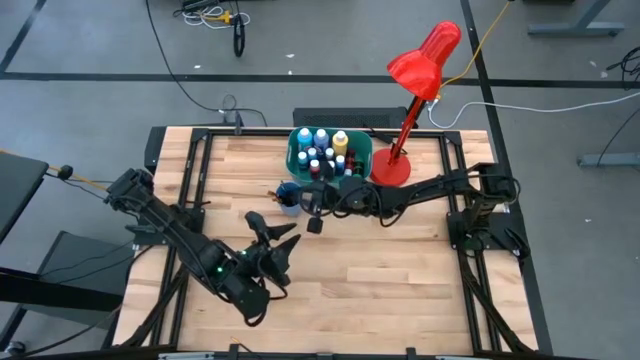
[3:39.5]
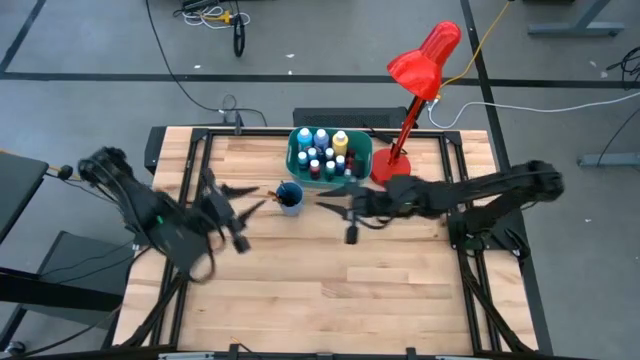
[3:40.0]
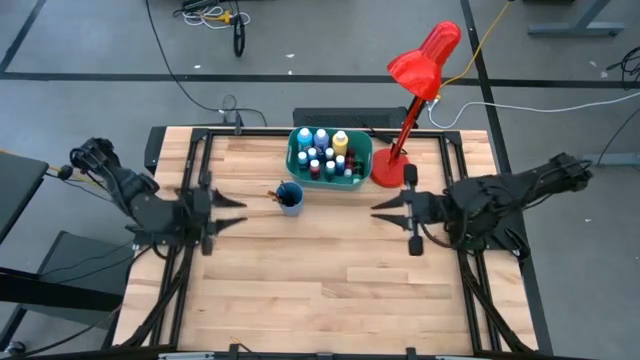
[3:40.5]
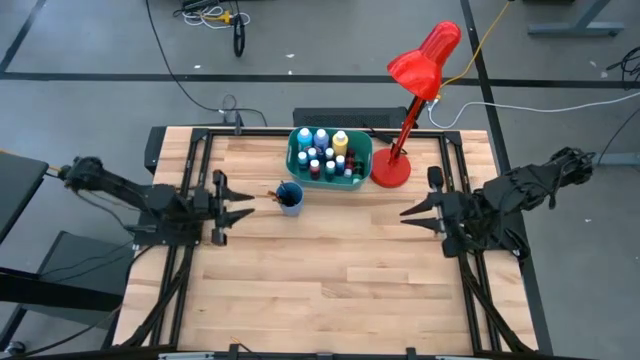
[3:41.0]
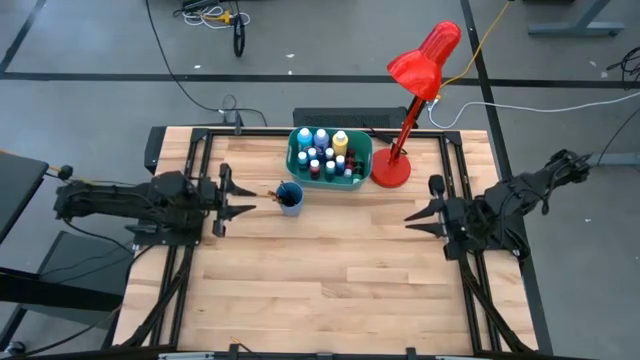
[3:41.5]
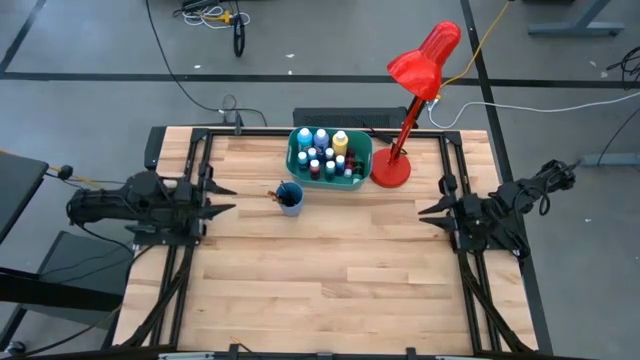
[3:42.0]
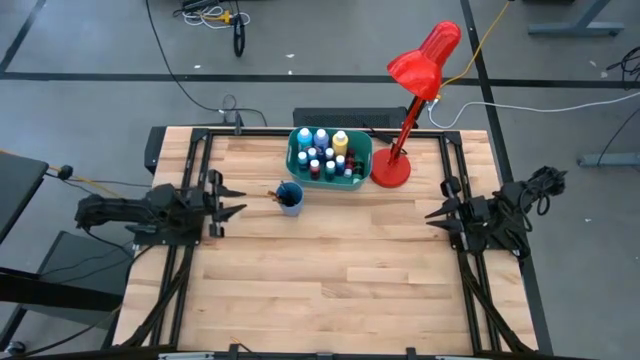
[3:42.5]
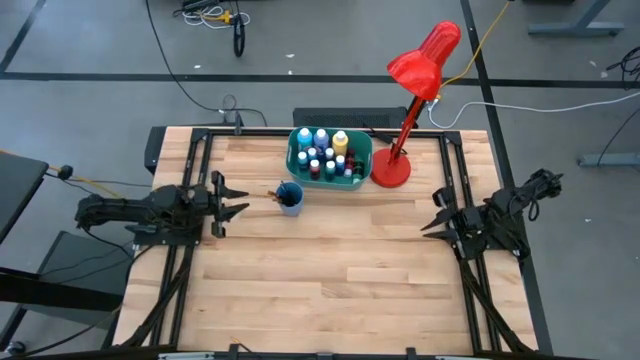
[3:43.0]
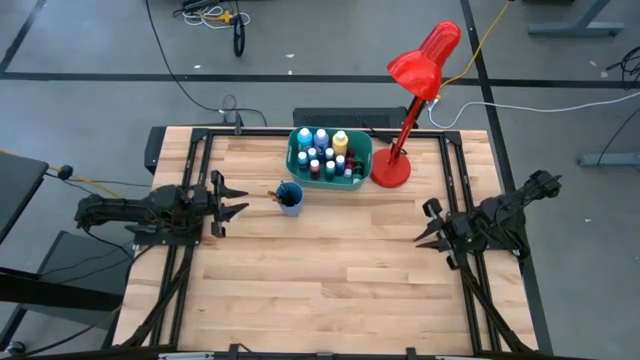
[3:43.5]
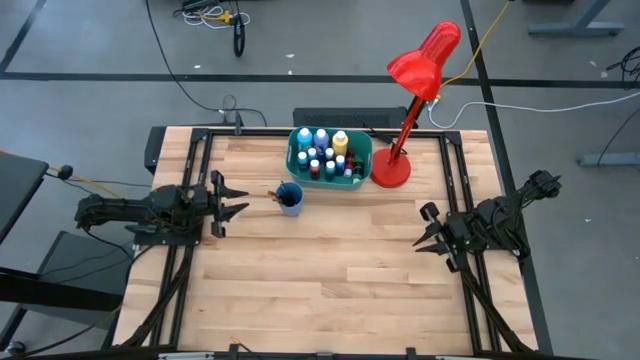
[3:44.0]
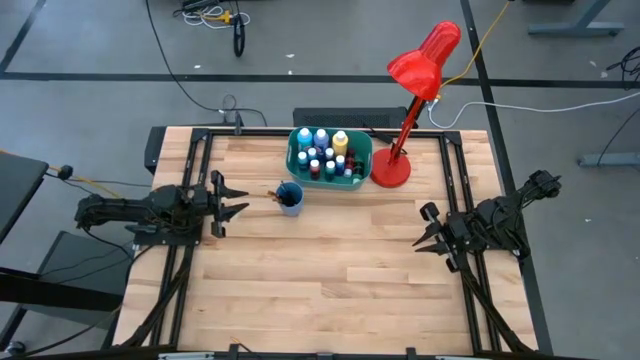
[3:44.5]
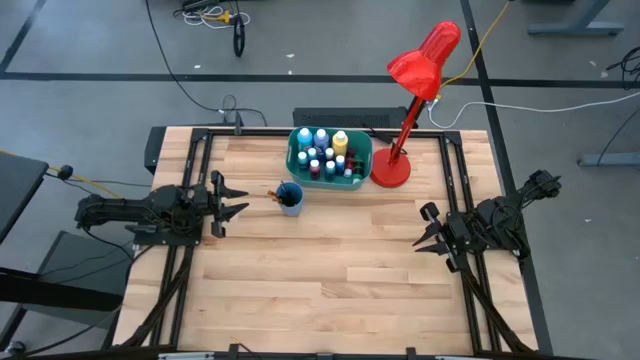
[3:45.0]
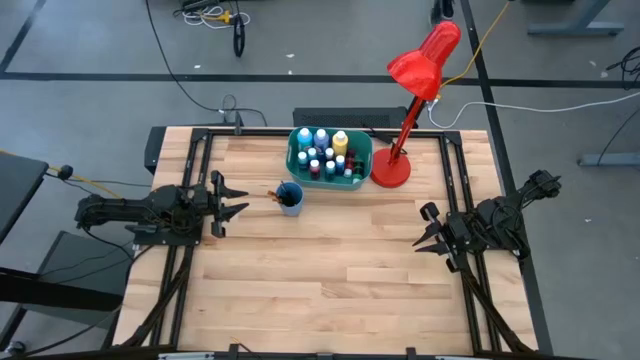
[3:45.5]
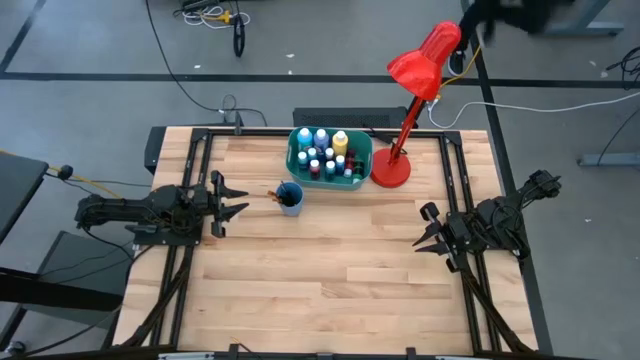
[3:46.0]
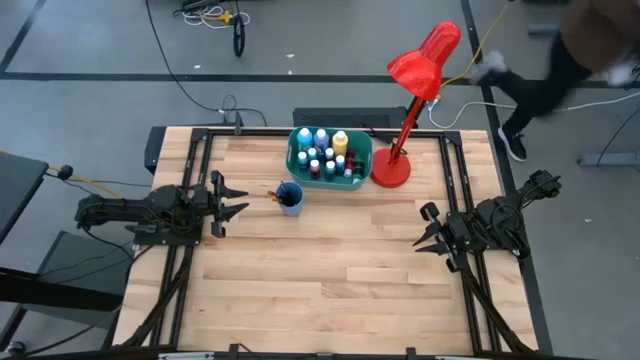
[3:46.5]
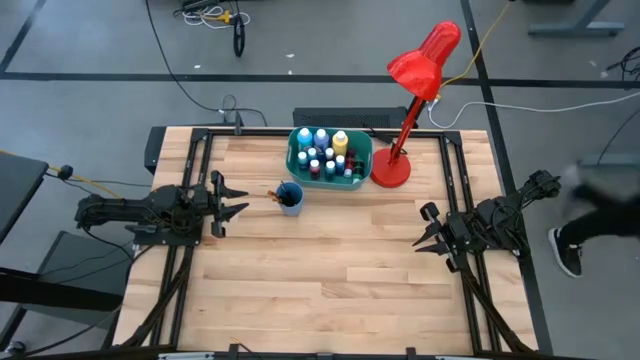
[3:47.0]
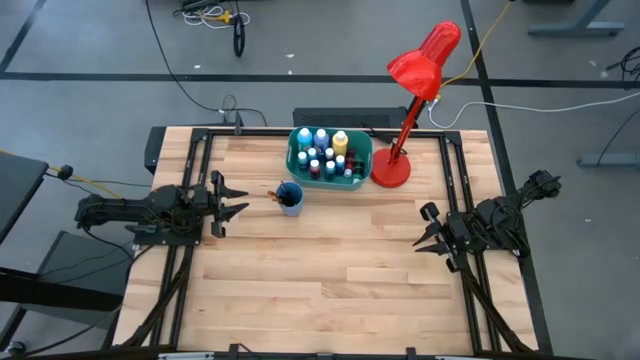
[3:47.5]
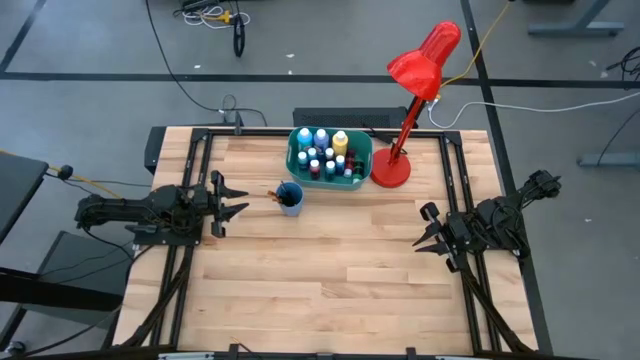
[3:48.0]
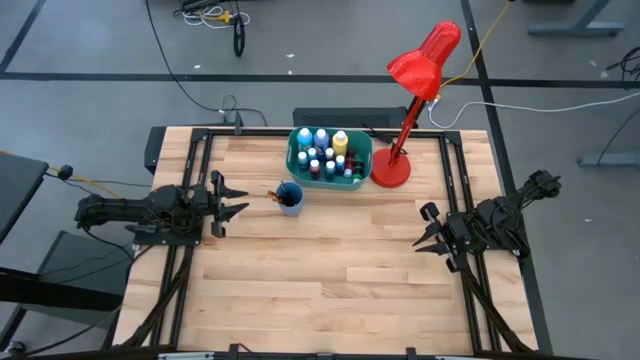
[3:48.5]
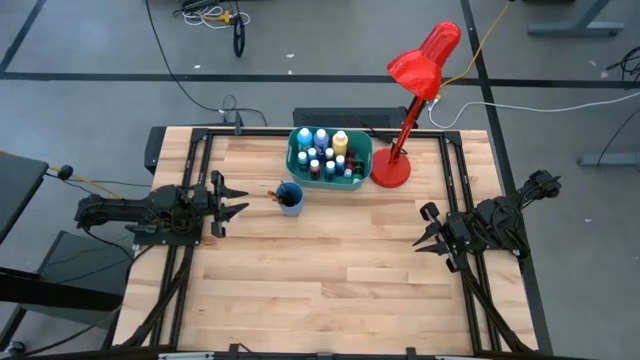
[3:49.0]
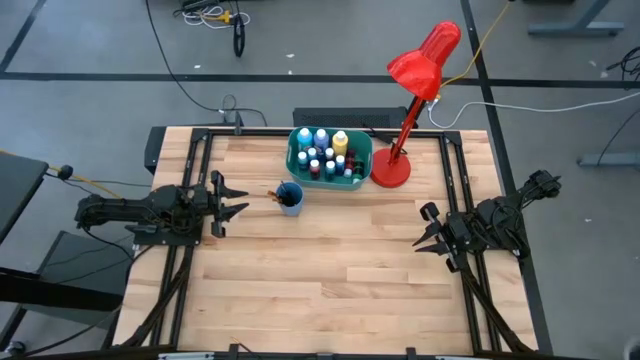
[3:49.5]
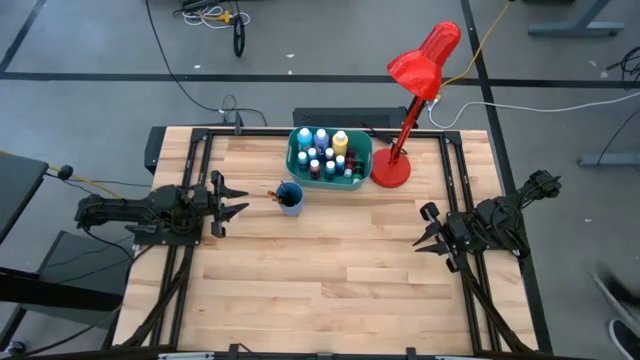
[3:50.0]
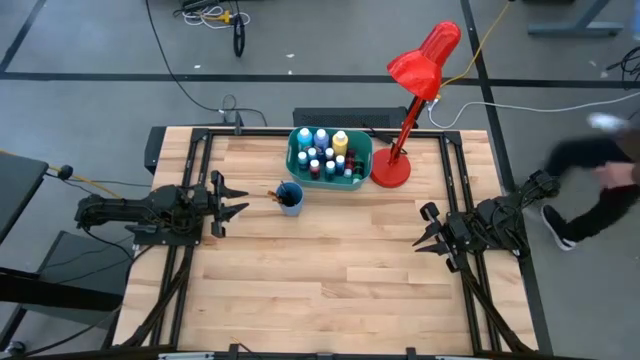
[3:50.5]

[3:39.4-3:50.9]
Task: Pick & Place Paint Supplies
Return to Home Position

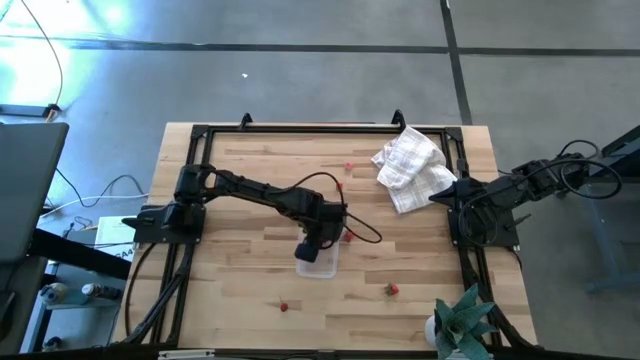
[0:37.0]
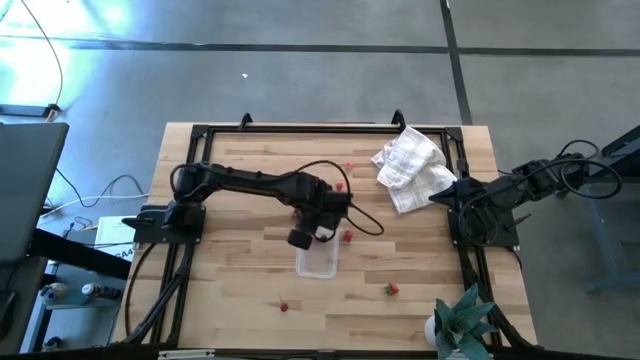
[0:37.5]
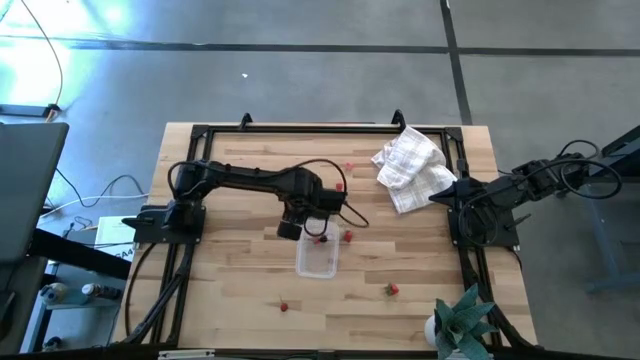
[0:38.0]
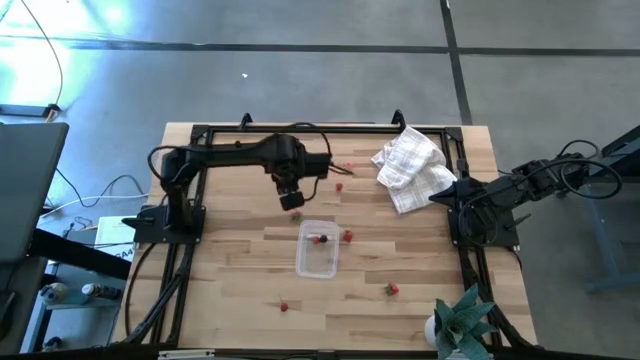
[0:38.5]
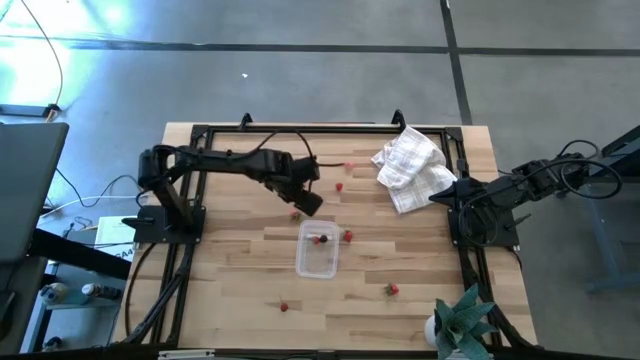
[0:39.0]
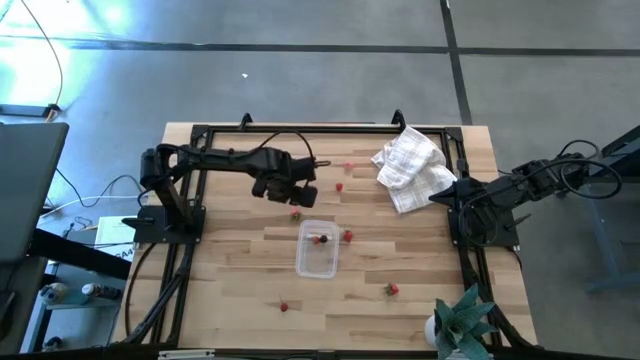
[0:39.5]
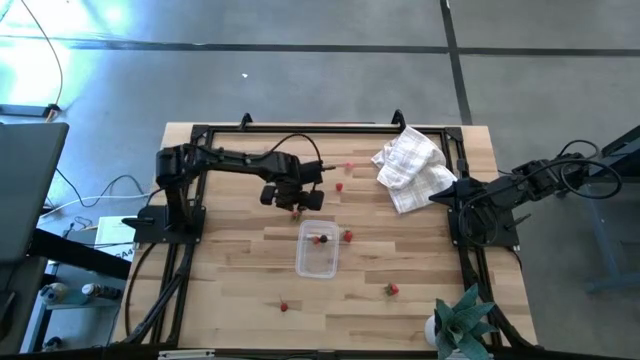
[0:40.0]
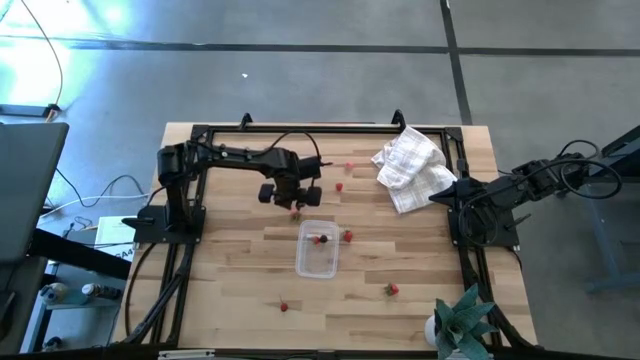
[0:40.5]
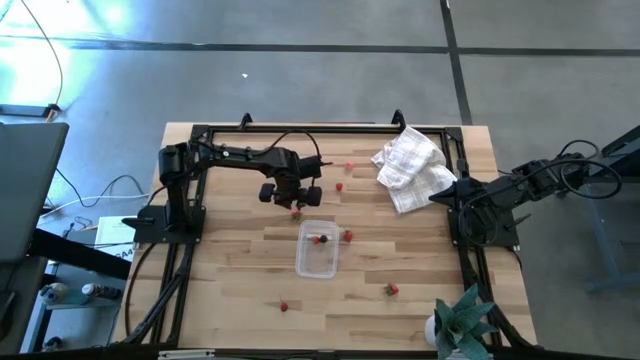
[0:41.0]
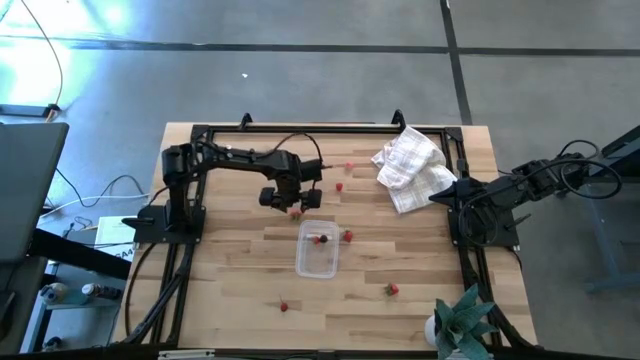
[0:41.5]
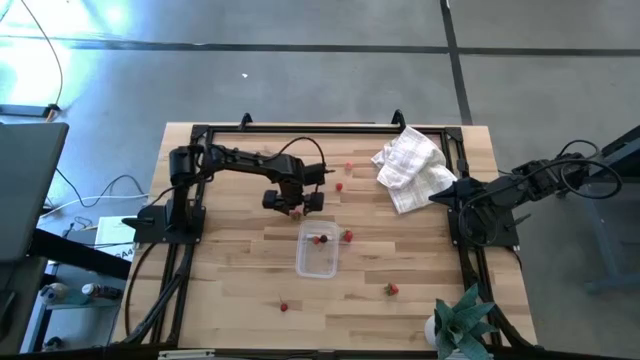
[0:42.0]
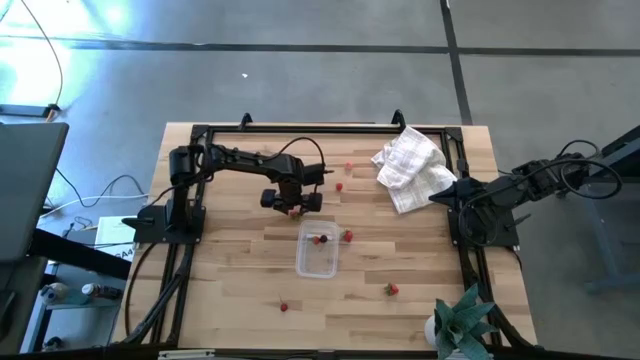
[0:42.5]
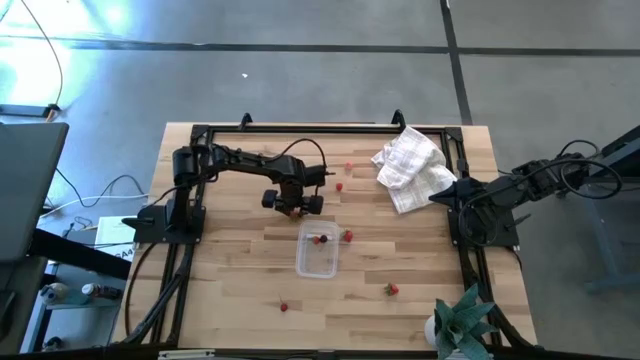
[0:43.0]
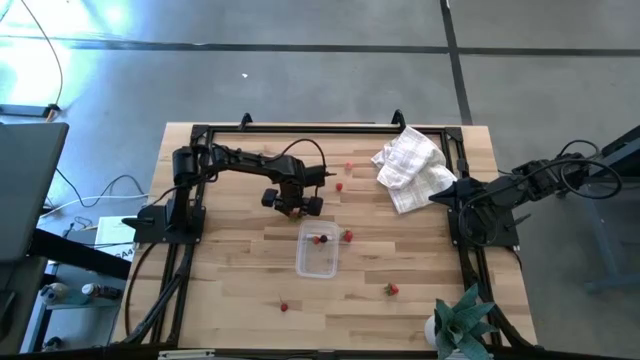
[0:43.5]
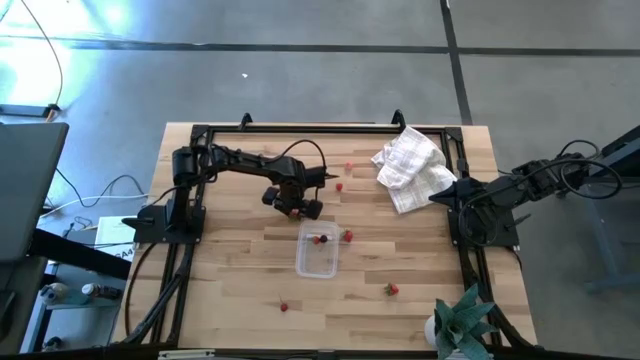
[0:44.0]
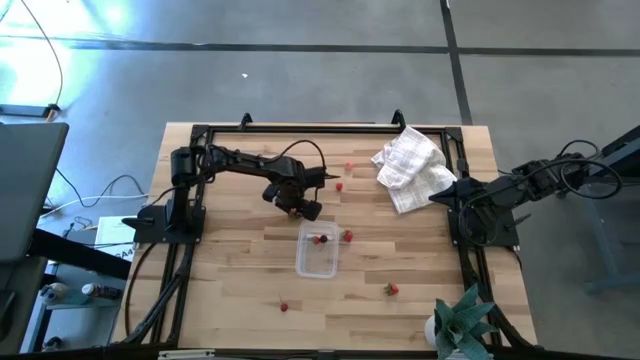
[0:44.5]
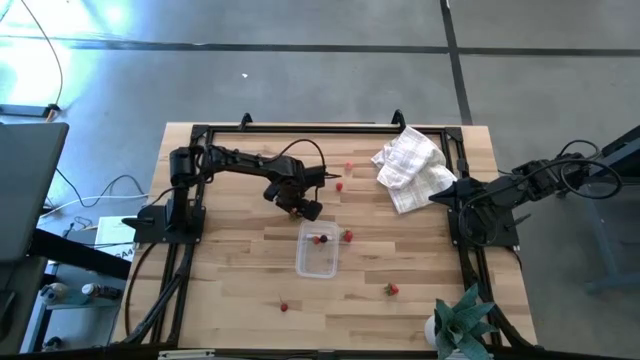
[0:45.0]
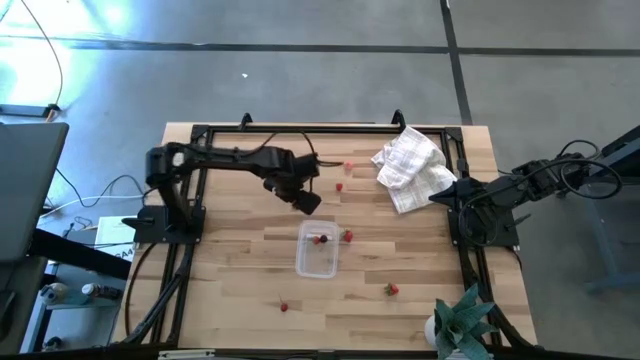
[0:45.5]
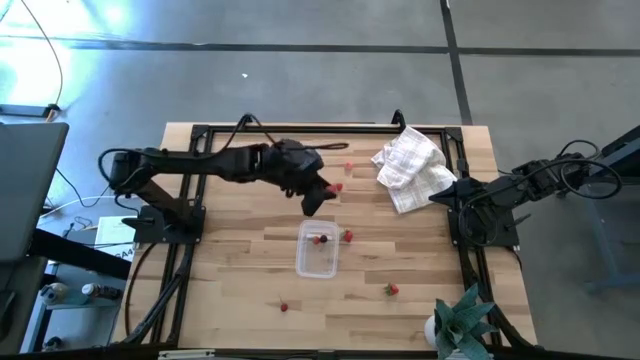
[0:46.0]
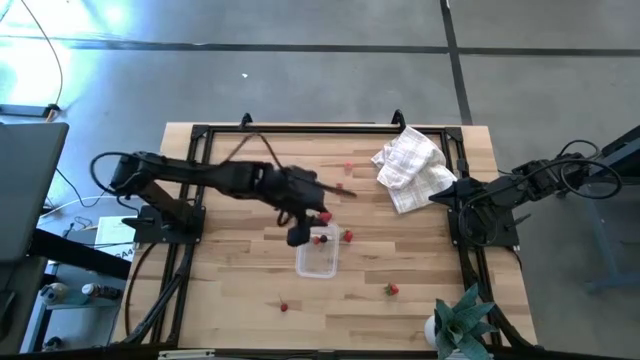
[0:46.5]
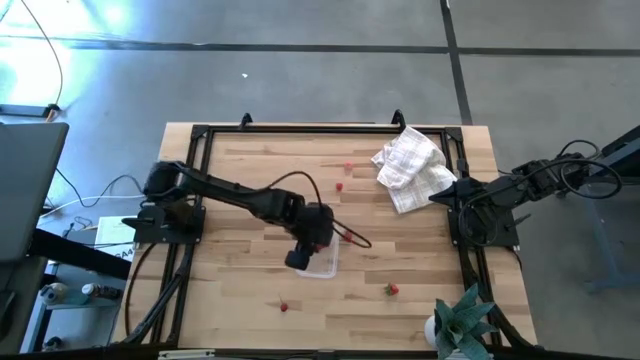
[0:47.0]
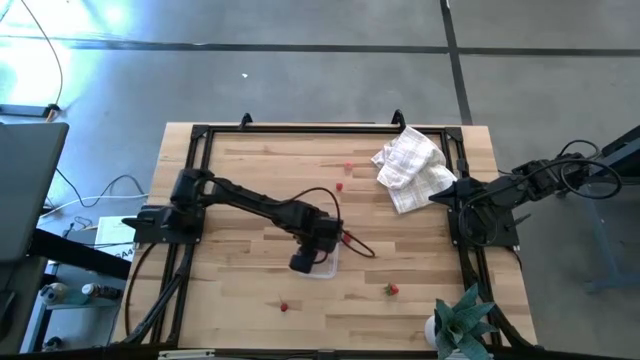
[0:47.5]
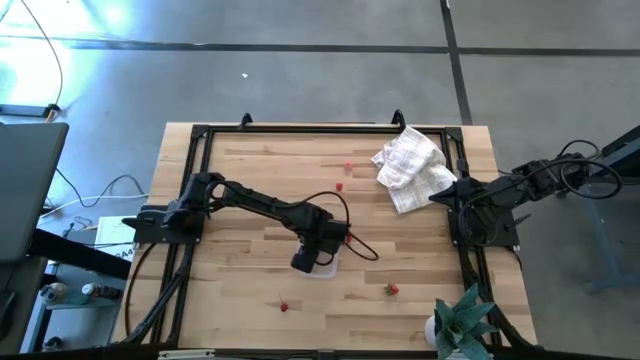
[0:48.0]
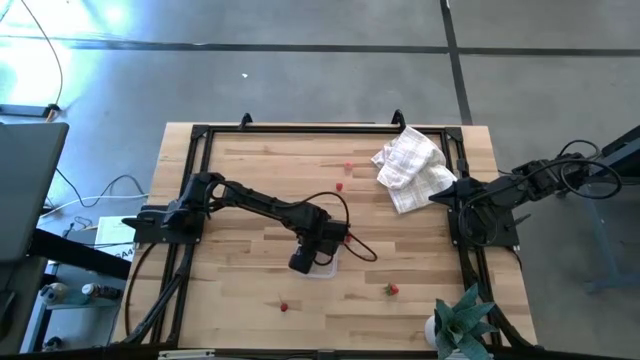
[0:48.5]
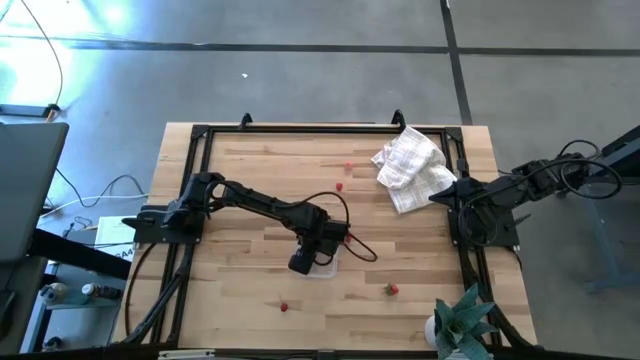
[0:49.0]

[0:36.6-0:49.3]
Task: Pick and placing Produce into tupperware
Put the red strawberry into the transparent container
